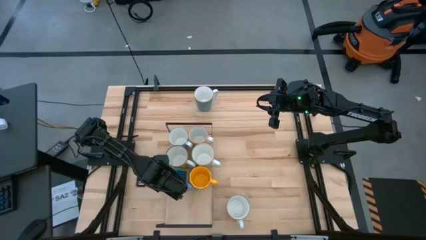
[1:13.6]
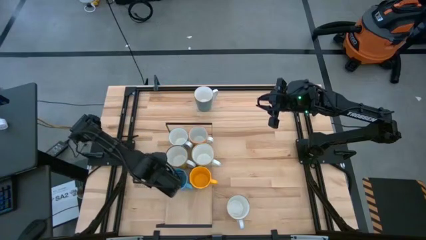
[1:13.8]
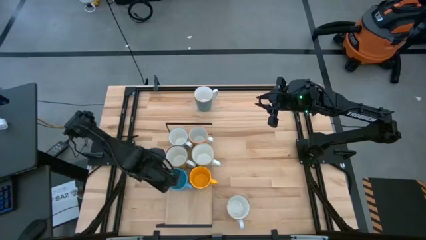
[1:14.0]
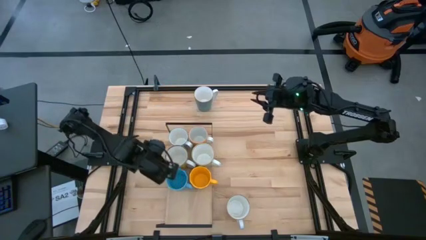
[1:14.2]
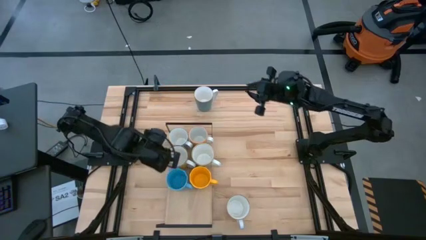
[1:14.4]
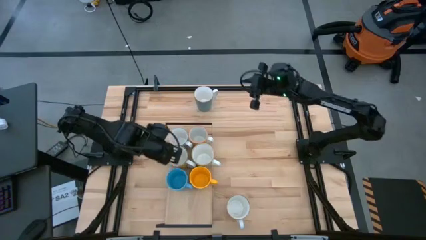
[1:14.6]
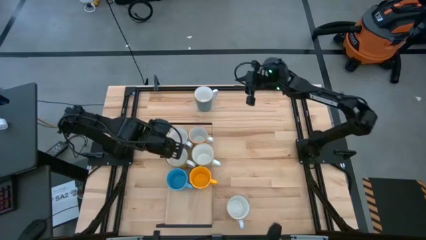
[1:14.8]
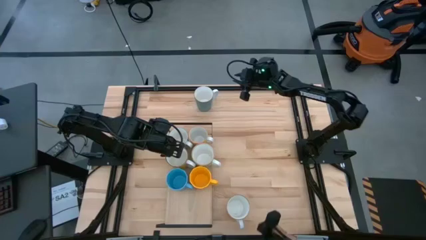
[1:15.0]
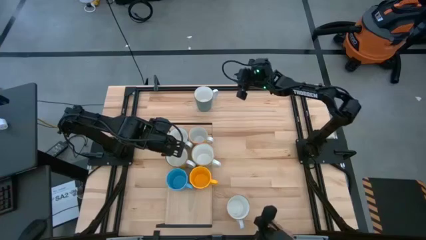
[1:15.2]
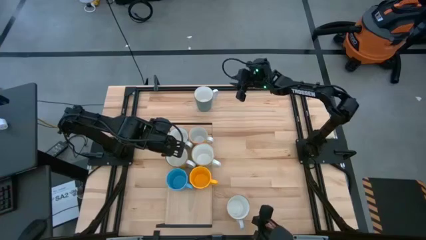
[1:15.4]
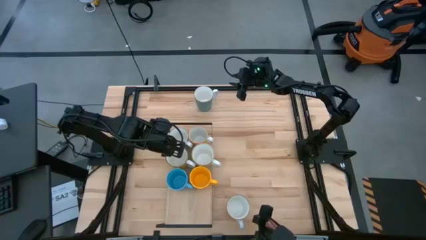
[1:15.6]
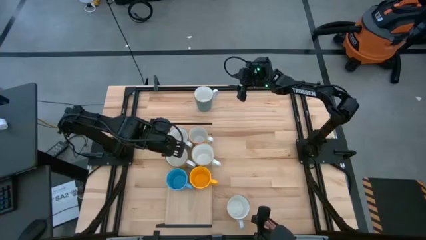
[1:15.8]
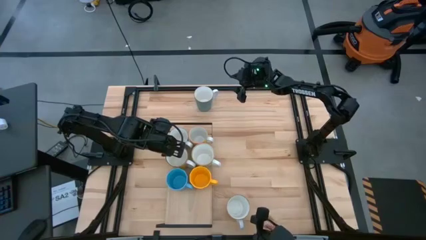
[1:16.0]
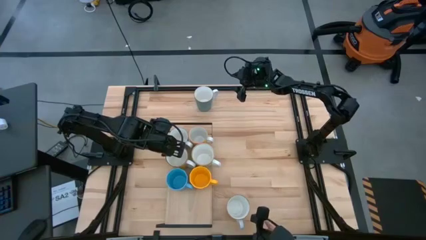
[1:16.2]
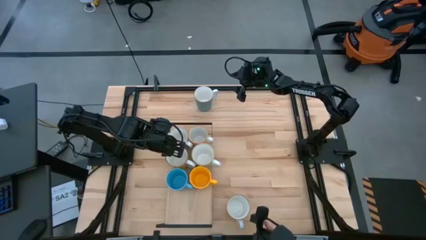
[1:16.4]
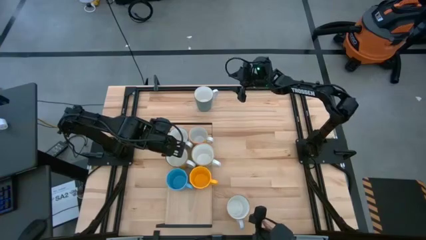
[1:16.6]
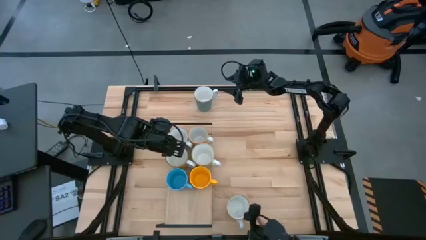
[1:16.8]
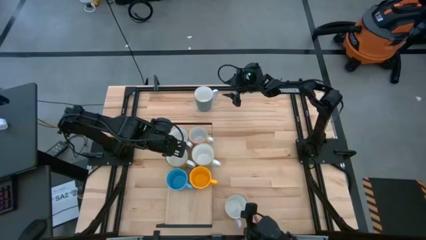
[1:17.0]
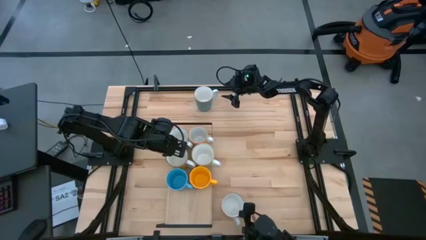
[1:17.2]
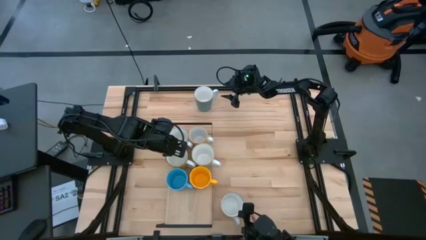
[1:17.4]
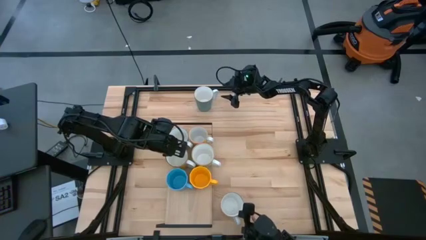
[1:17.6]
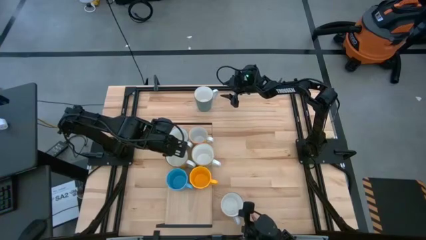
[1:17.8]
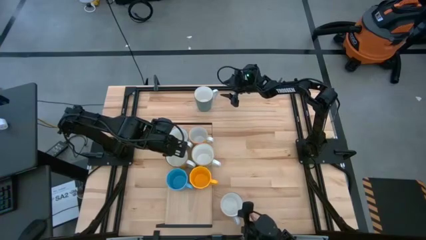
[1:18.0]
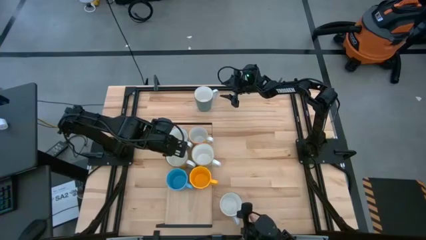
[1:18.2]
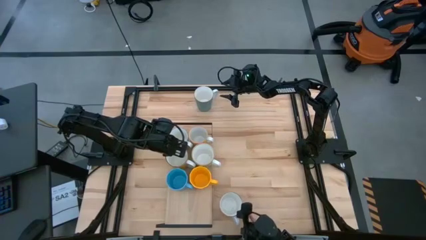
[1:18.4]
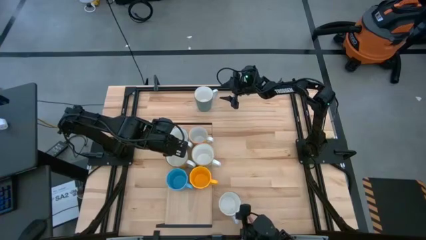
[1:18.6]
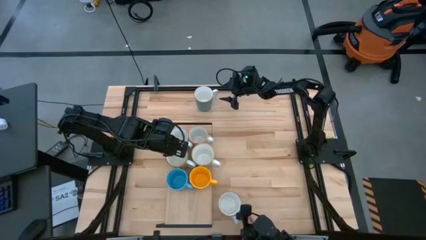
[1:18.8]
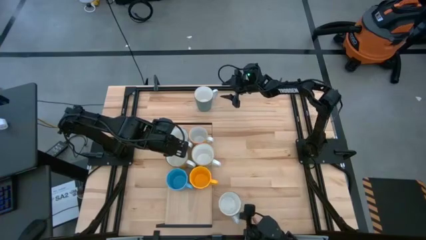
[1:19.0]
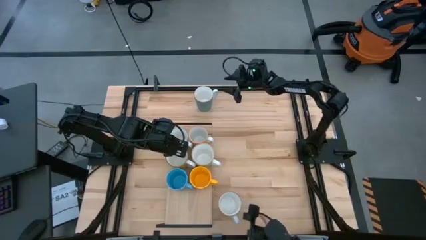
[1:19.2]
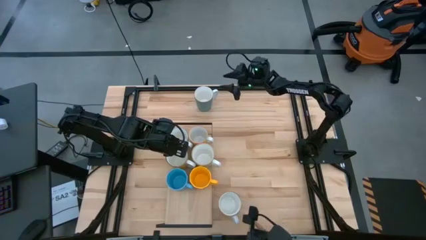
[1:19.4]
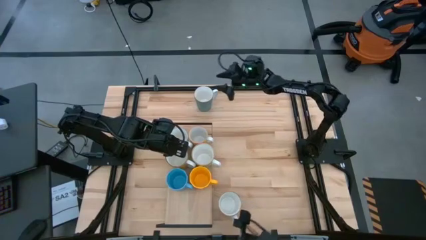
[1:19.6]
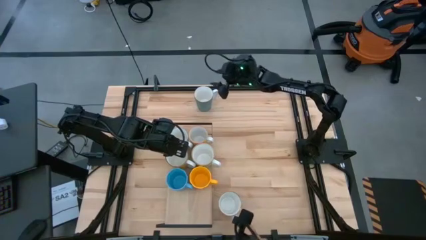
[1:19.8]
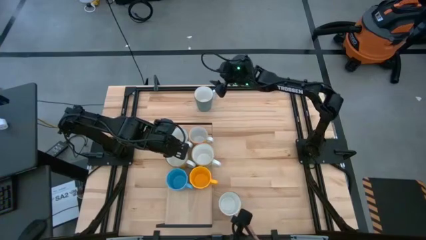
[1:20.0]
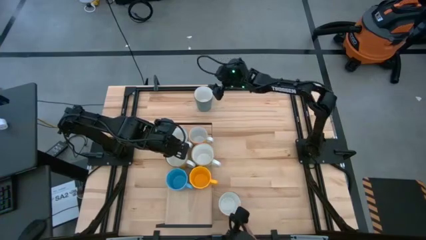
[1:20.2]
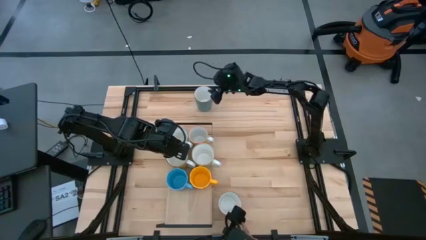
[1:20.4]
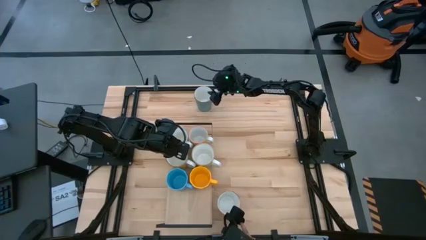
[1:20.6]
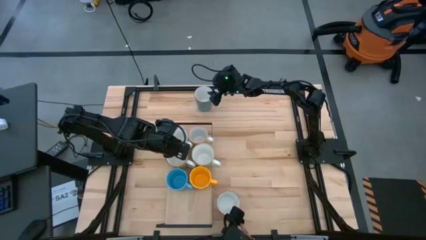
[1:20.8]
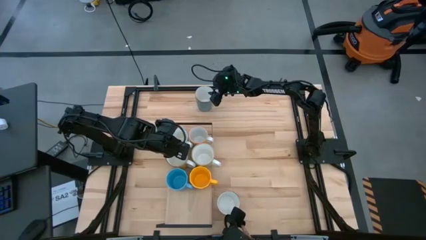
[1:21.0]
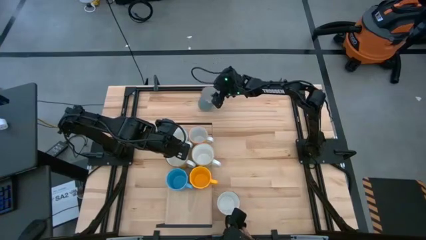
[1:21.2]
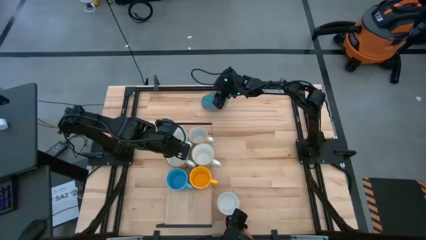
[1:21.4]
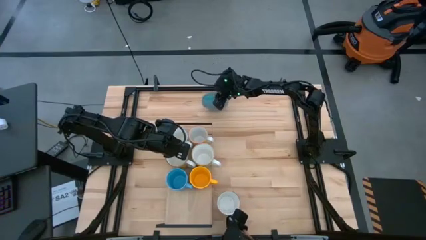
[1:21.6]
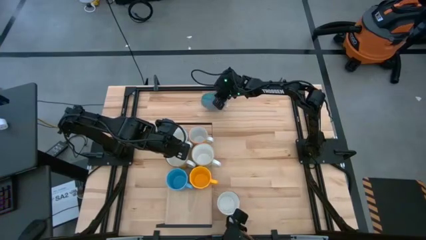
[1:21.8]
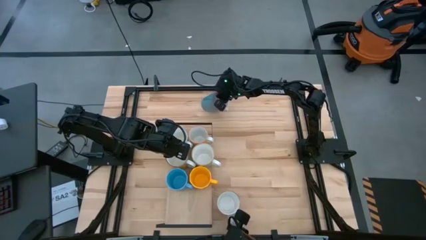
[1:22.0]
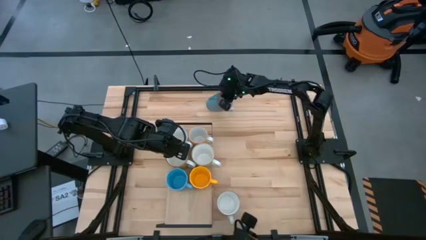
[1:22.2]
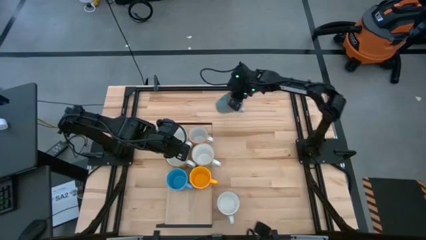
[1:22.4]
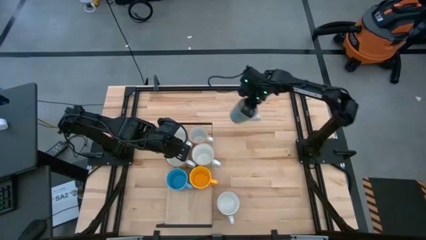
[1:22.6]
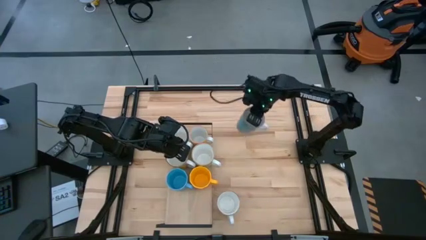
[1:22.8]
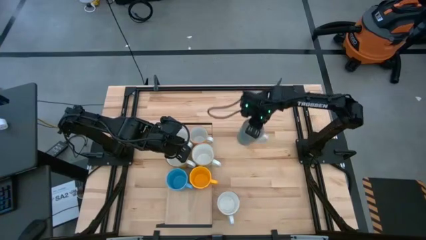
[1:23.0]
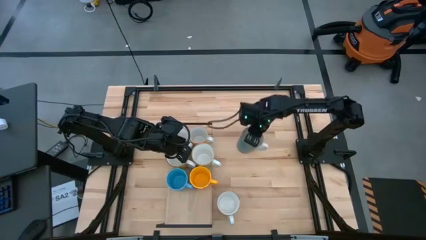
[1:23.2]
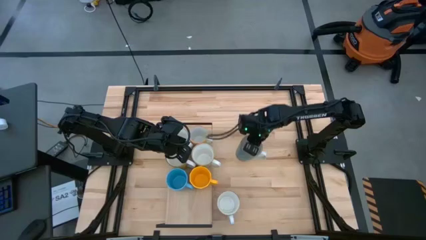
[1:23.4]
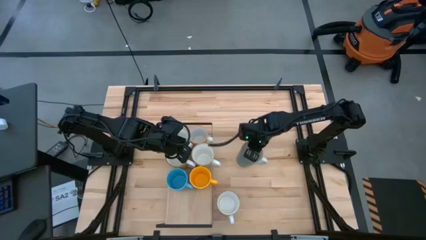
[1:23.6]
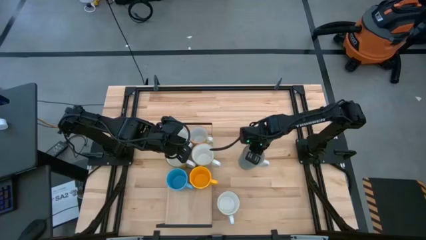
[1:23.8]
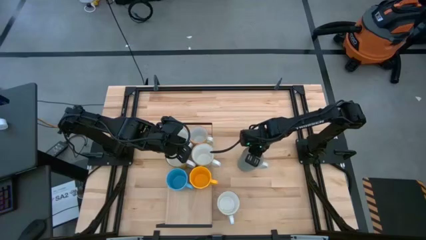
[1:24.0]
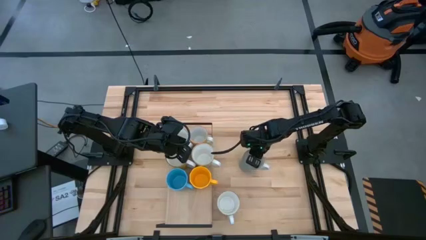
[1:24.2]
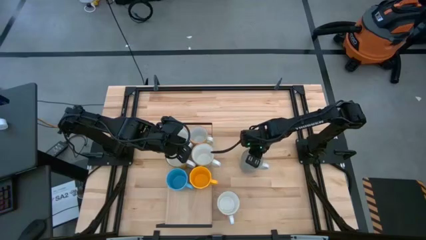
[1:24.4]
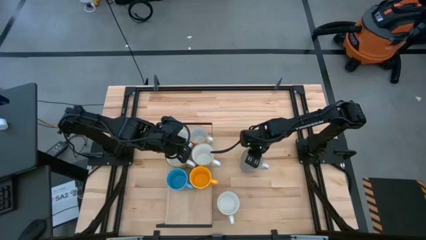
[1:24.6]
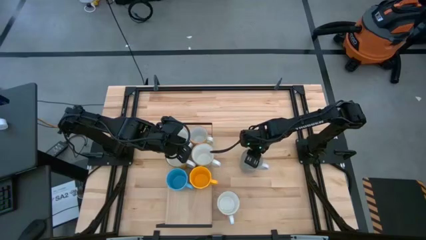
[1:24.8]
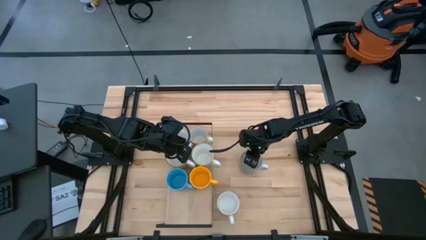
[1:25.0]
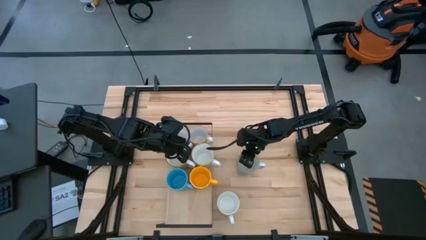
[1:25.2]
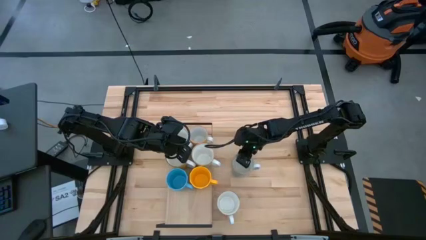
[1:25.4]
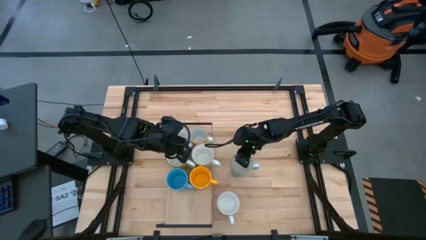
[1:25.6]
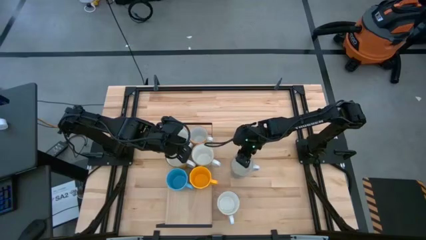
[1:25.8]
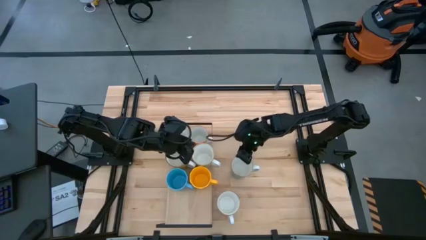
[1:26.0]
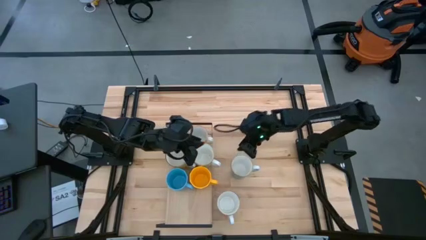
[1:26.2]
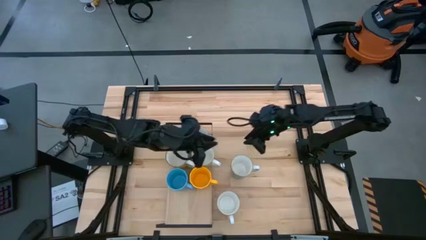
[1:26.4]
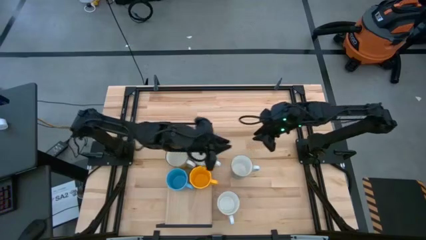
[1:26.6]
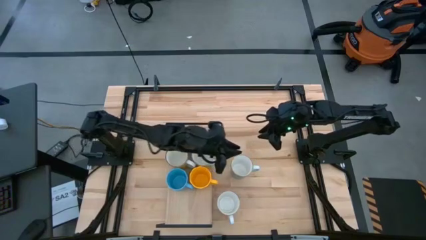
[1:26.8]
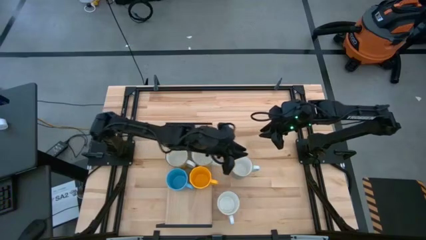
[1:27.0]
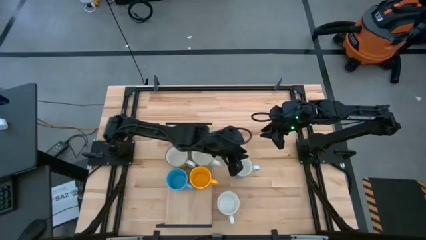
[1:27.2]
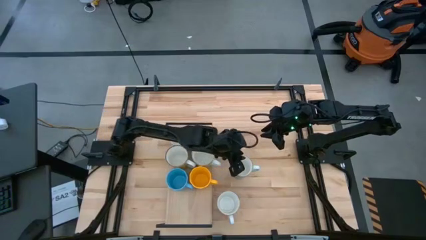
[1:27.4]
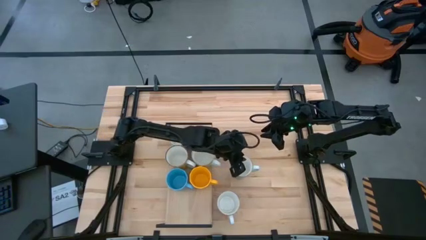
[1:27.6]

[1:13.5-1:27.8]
Task: Place coffee mugs
Put the light blue mug on the shelf

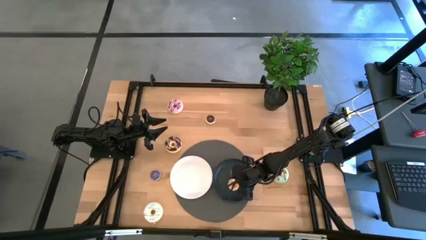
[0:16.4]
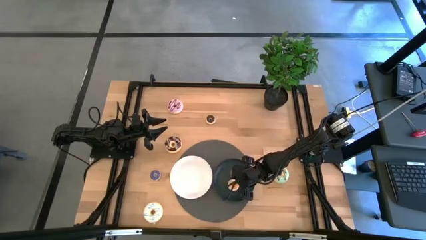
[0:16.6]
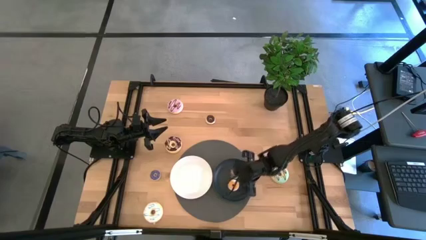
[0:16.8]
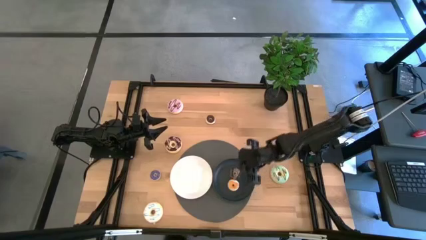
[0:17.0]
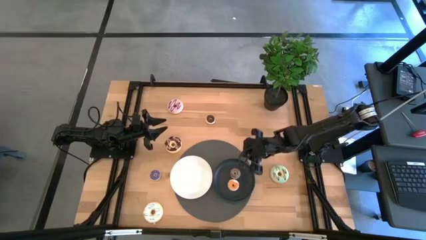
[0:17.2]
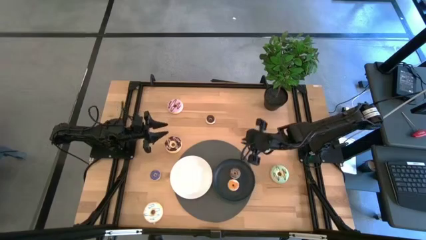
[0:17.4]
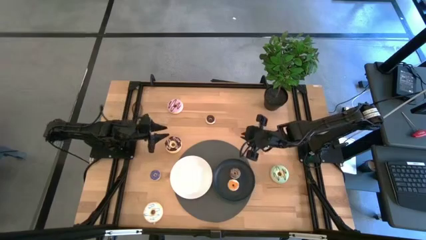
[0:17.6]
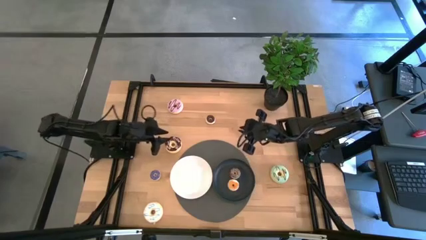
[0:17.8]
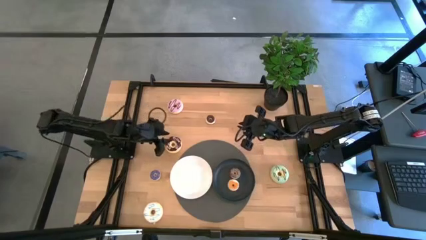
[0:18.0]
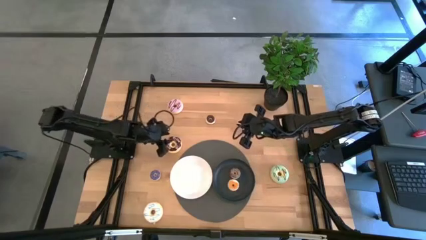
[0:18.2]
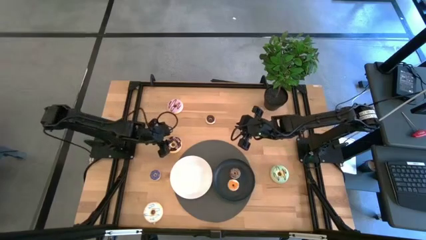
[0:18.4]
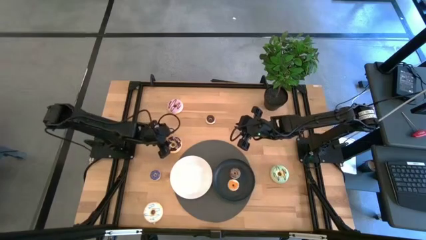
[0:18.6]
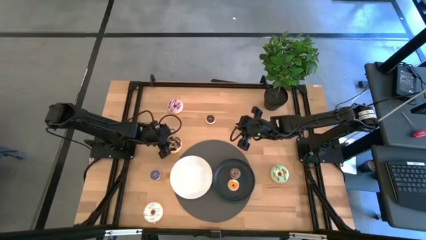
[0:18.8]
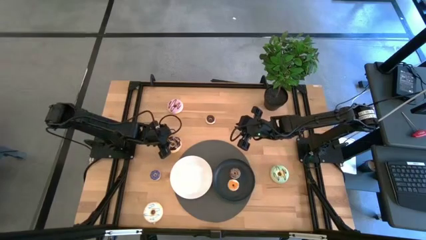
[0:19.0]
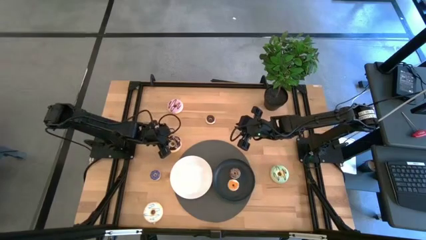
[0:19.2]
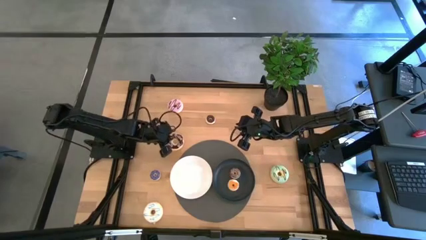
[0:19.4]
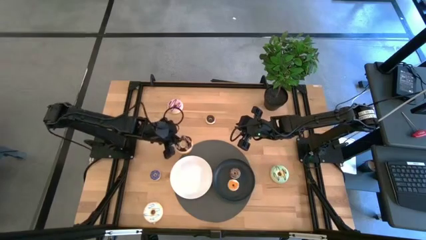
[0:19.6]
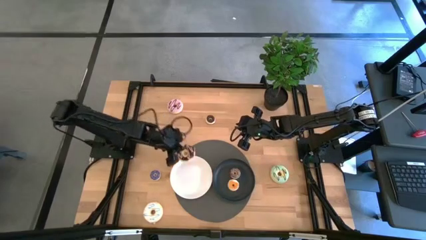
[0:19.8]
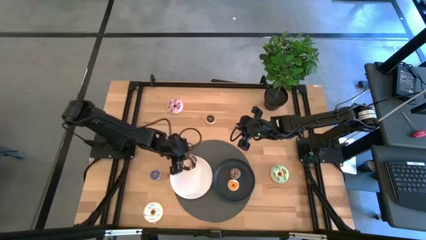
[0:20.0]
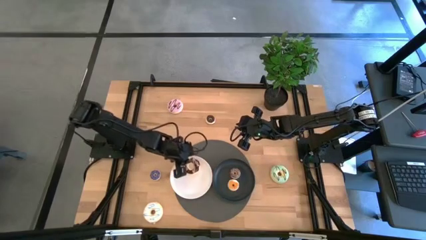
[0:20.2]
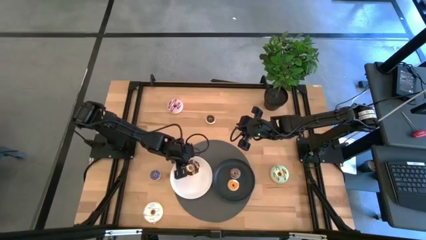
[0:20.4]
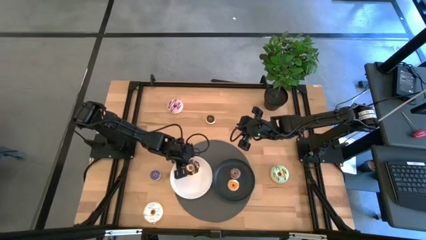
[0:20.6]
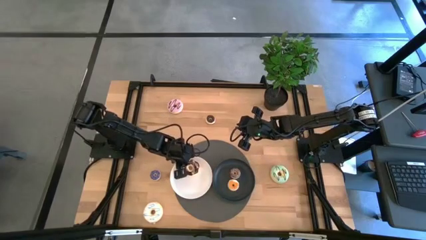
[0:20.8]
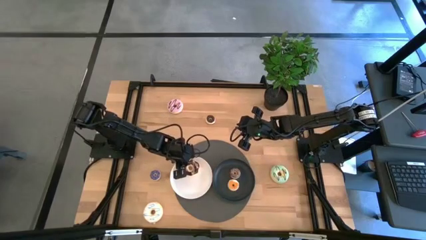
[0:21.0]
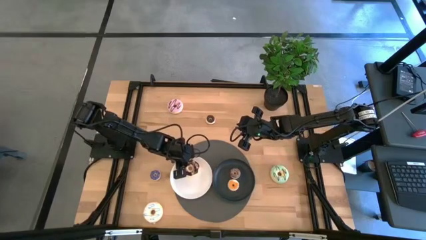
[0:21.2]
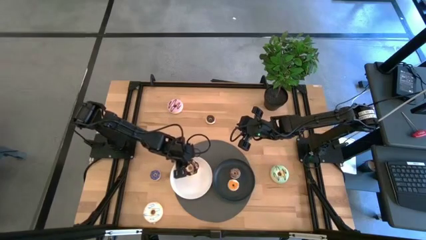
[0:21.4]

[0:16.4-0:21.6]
Task: Pick & Place donuts
Put the big black donut on the white plate
